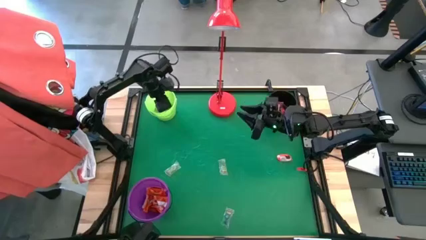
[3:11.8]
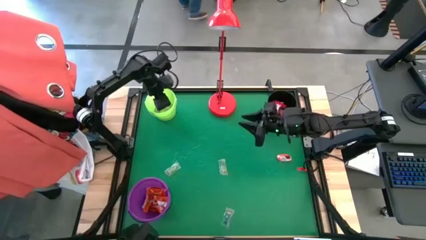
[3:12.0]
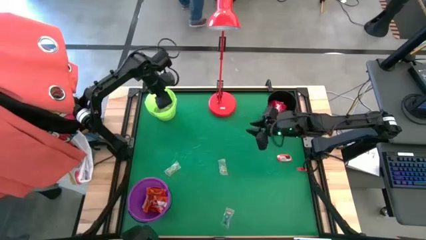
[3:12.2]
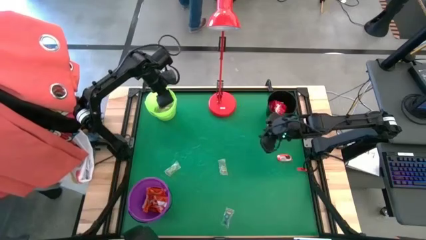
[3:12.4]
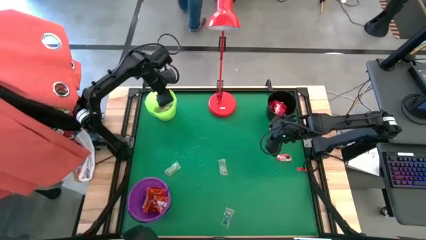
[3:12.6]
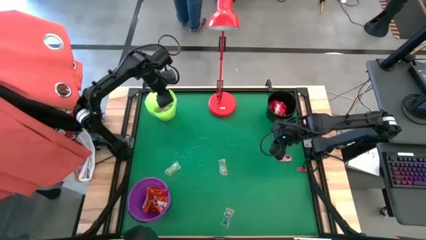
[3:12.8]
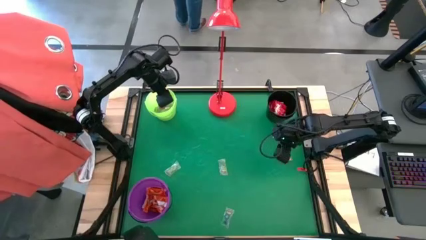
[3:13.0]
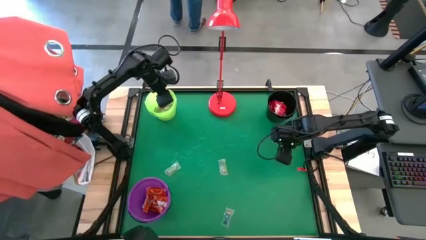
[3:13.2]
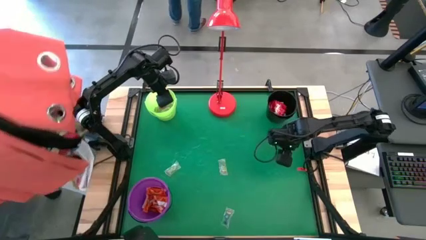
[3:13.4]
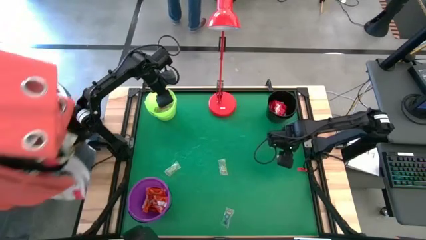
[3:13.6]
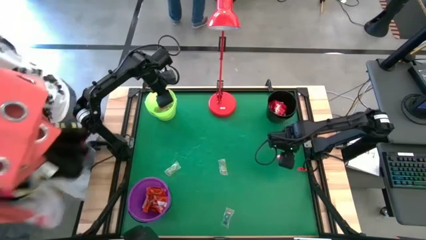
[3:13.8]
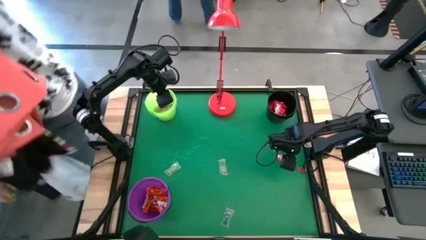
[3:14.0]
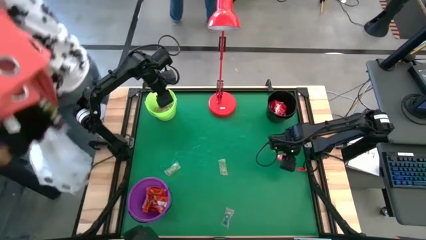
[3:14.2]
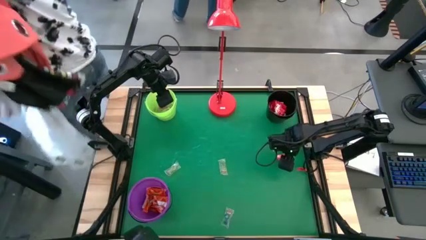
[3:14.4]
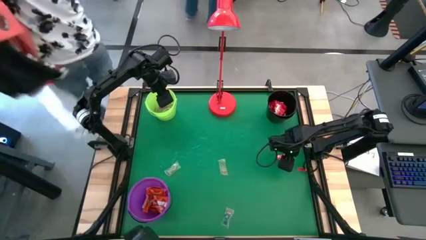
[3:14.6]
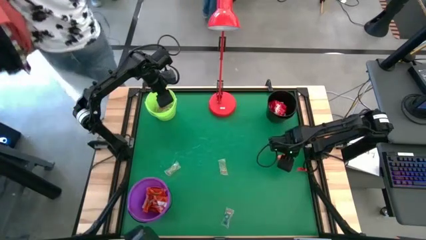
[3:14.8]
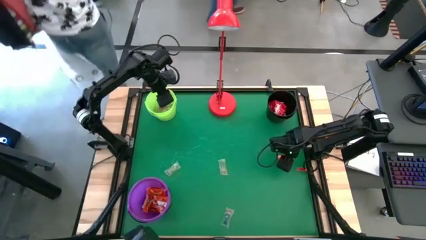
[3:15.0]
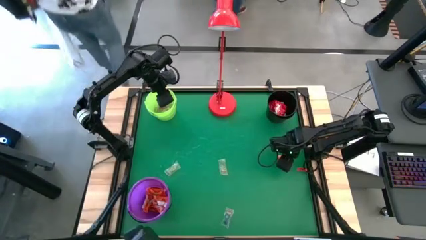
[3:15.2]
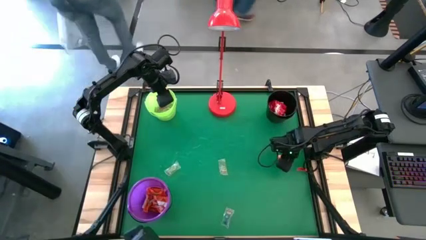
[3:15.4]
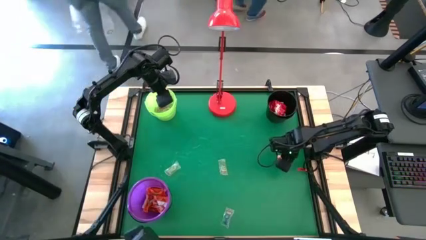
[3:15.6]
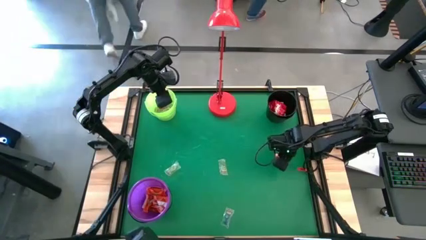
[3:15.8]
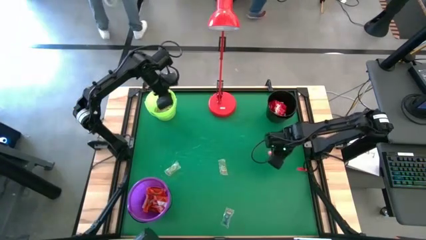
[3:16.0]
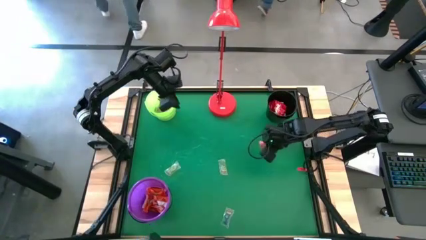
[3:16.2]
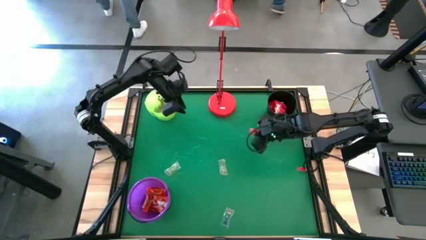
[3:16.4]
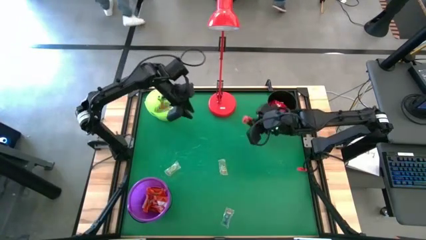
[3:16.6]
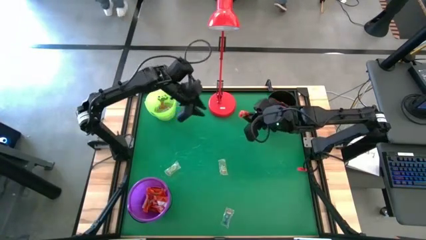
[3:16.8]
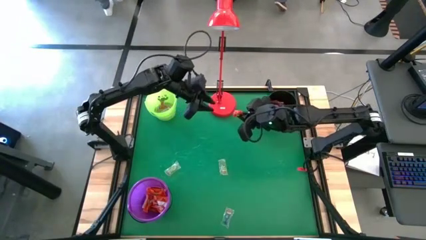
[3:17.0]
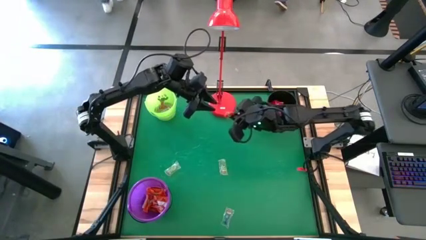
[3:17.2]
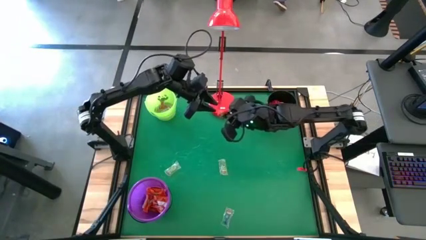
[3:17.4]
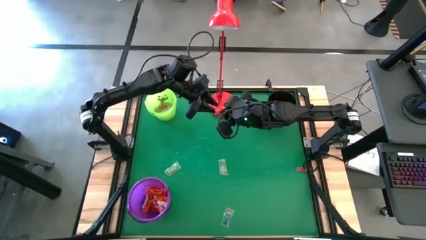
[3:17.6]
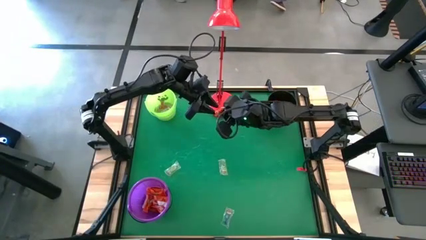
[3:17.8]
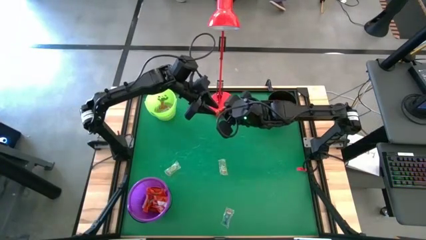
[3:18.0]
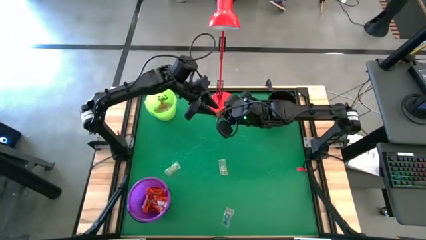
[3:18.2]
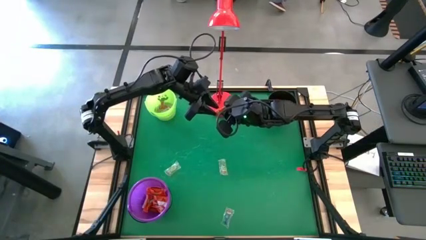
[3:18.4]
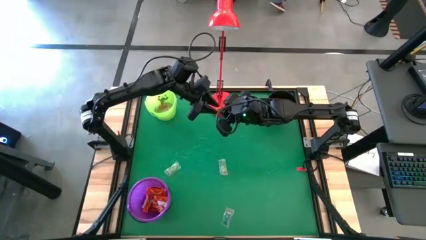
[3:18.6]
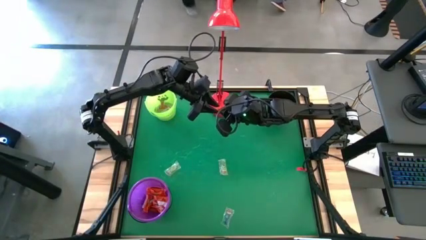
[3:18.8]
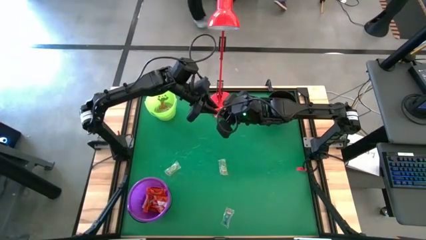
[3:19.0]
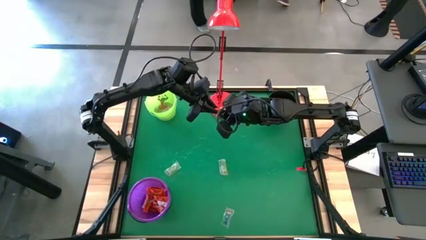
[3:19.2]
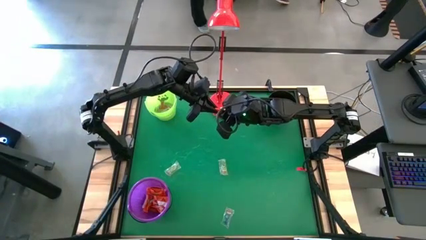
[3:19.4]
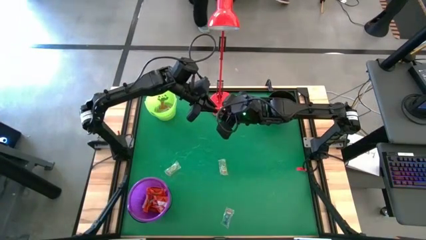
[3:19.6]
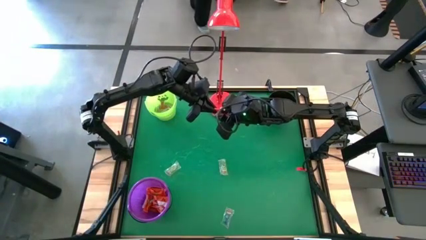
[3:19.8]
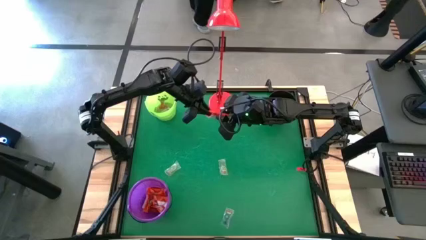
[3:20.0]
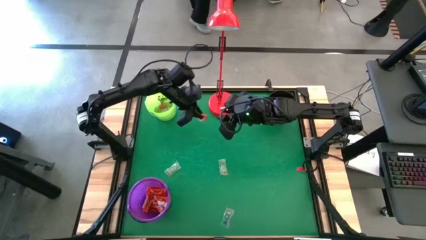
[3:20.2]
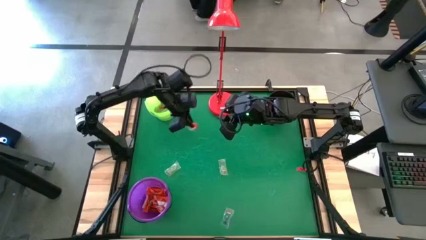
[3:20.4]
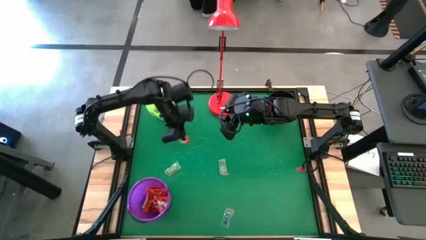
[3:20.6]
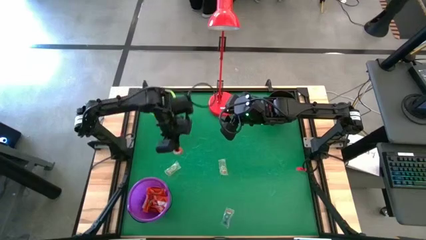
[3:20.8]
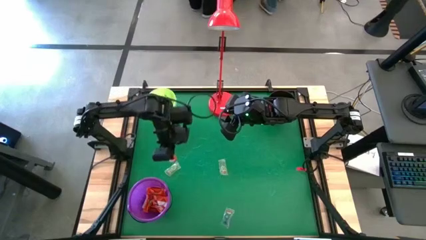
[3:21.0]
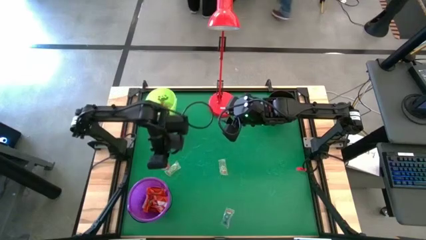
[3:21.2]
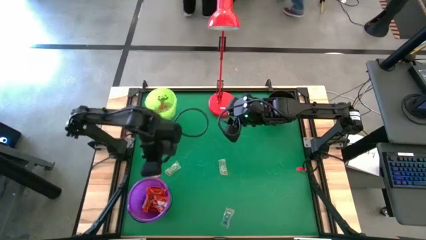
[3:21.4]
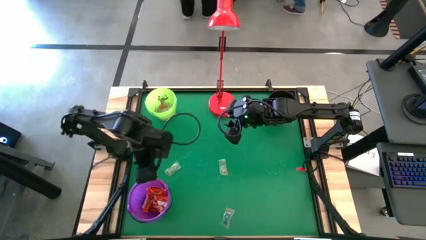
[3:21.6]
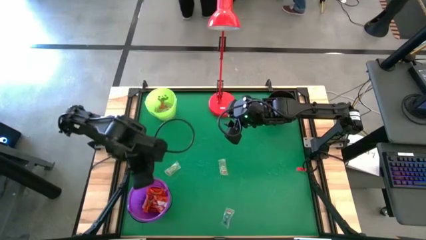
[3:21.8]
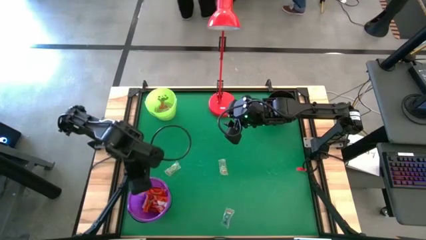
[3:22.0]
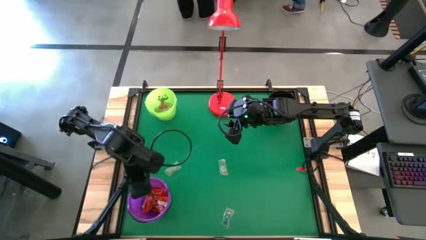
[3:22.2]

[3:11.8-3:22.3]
Task: Sort candy
Put the orange candy into the violet bucket
